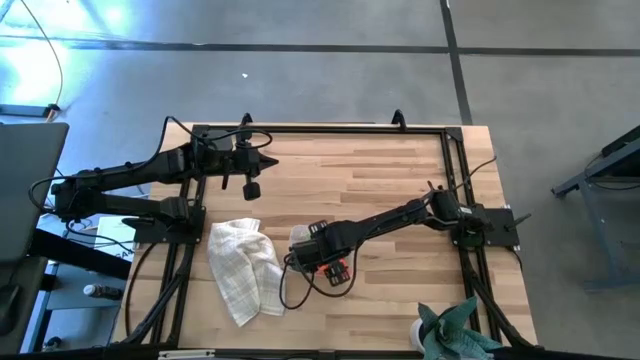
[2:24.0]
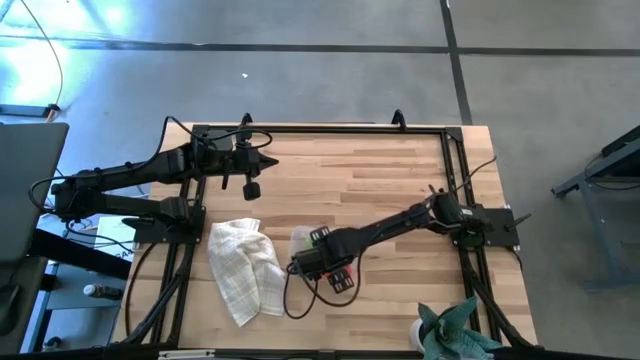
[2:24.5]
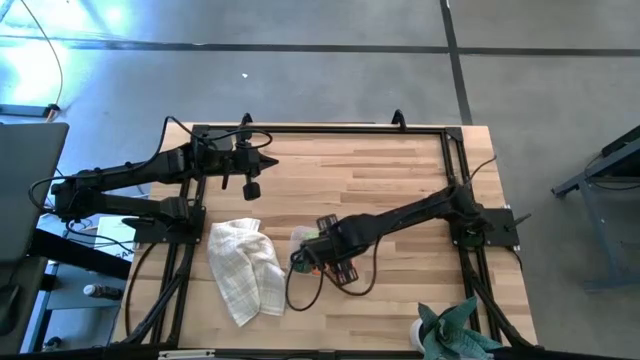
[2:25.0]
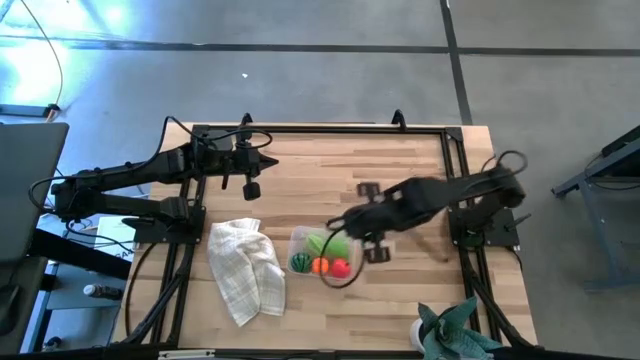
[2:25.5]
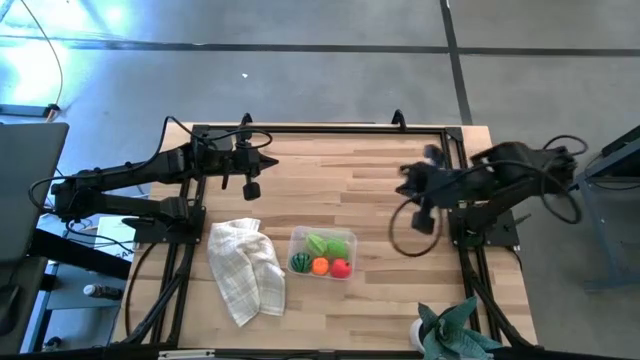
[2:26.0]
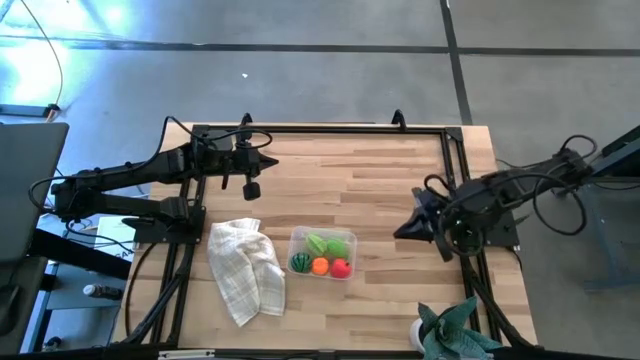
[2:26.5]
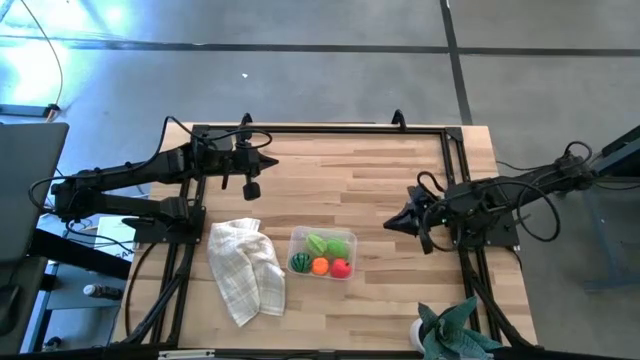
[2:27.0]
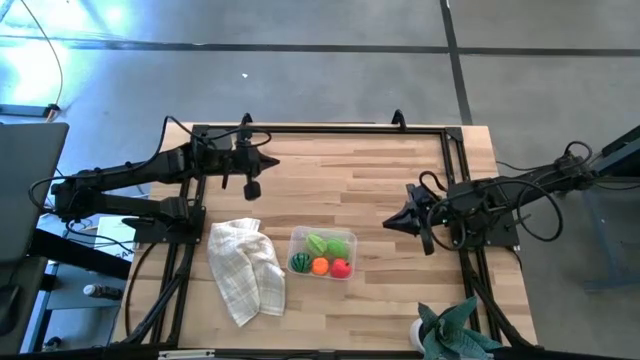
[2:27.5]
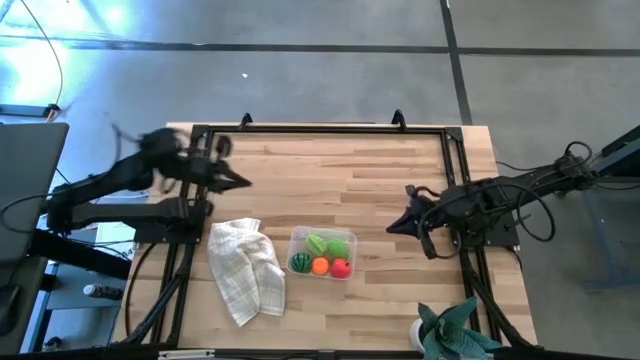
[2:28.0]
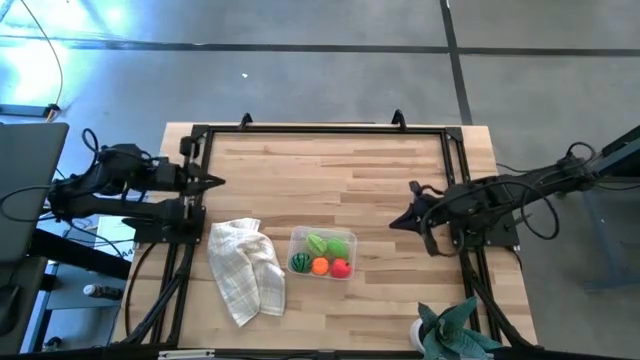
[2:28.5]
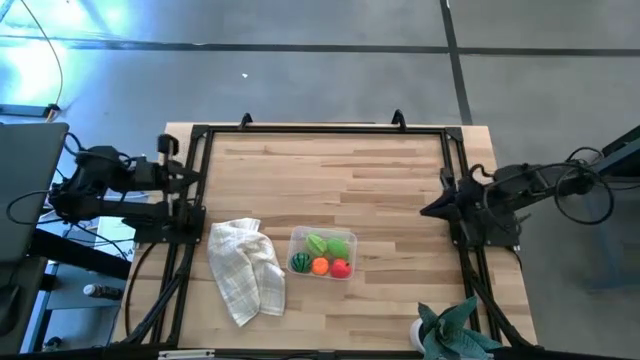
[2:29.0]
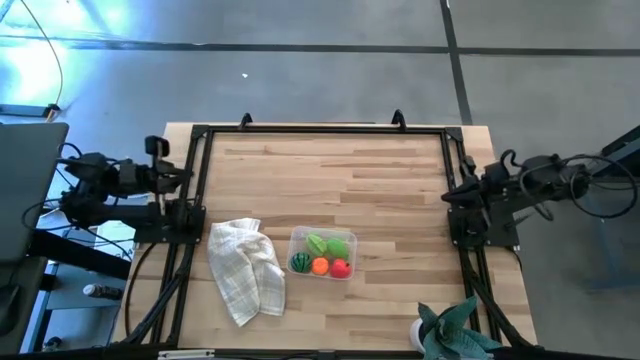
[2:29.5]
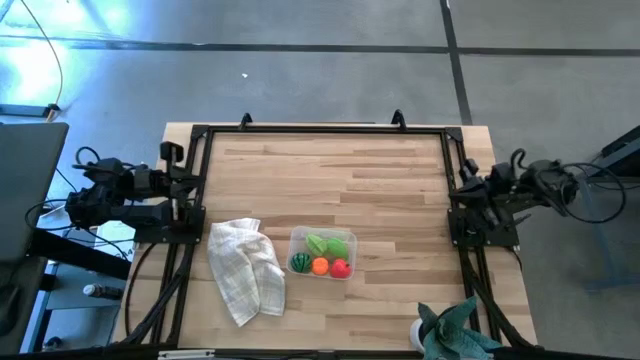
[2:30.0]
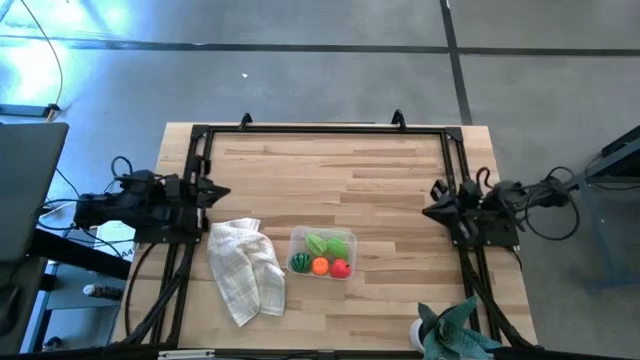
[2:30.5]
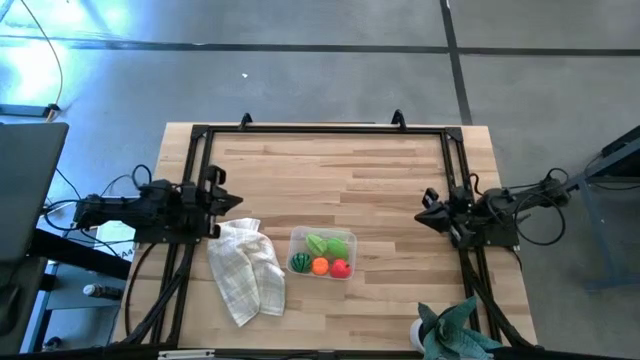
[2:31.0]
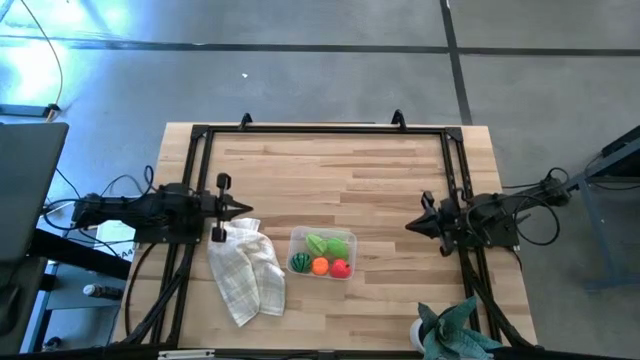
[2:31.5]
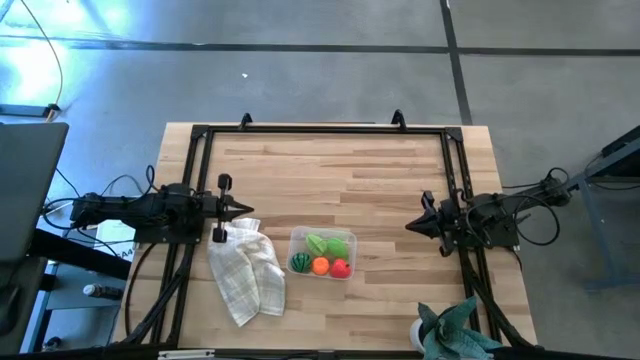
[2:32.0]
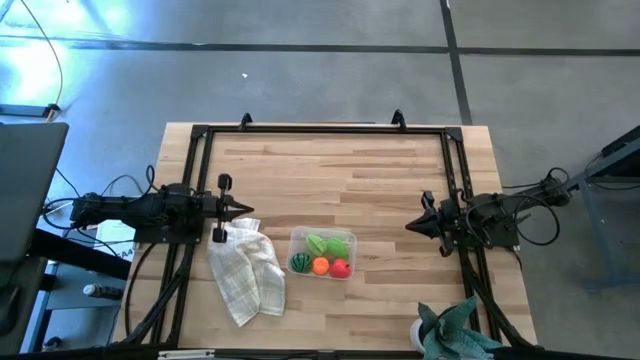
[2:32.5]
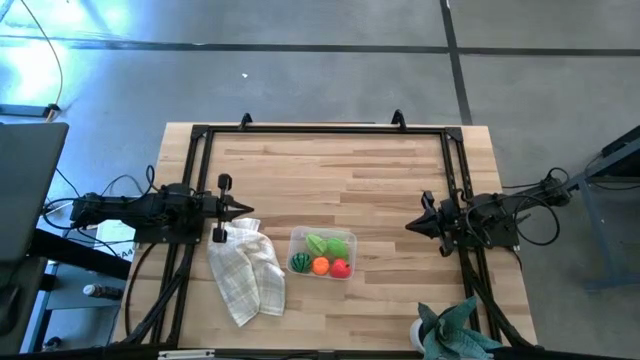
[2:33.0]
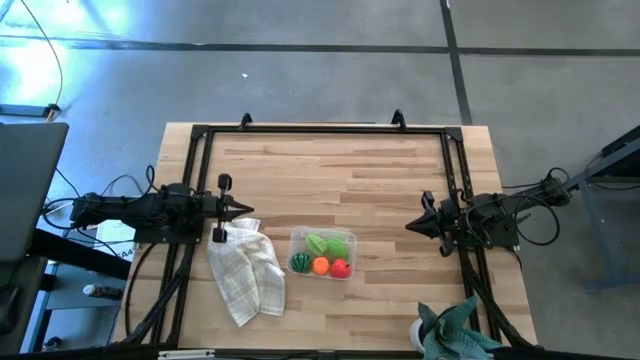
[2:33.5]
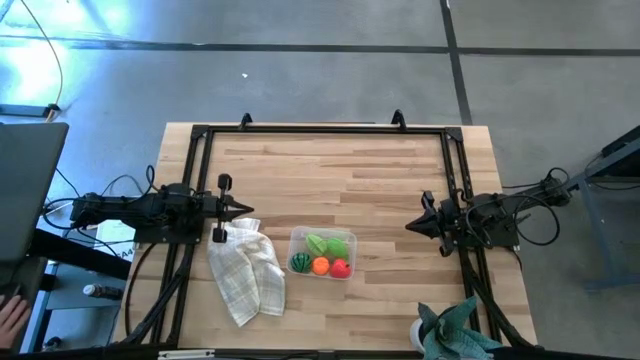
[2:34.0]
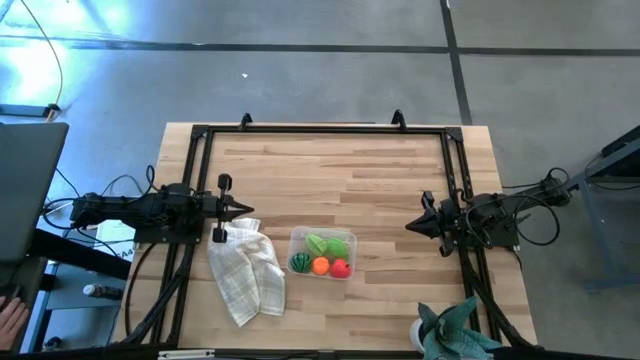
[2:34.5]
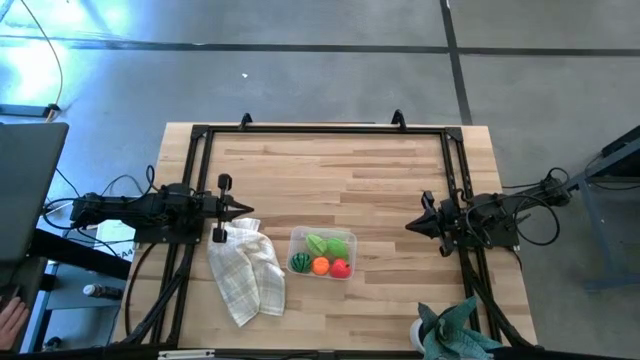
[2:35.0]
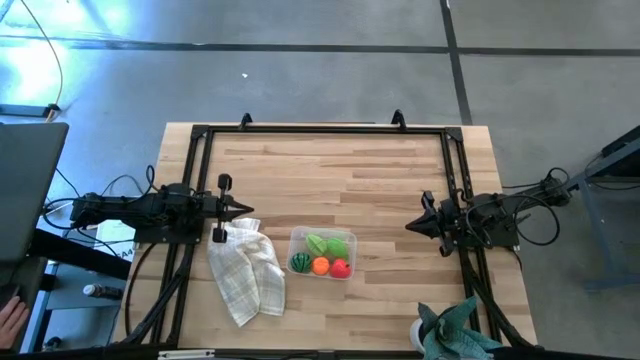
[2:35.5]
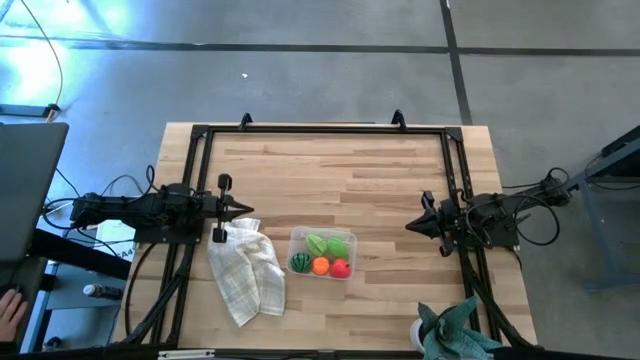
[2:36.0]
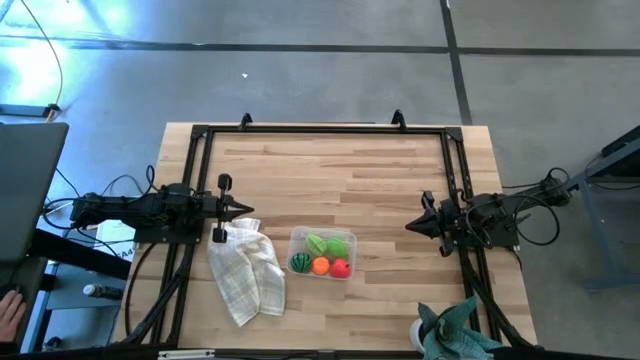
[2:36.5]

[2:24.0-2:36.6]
Task: Pick and placing Produce into tupperware
Return to Home Position

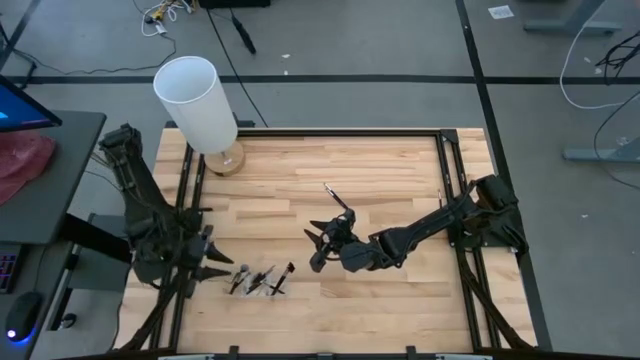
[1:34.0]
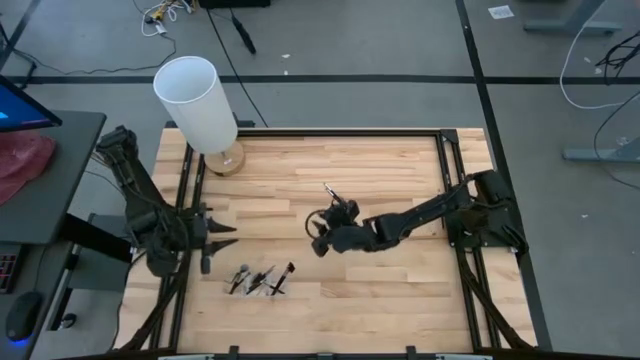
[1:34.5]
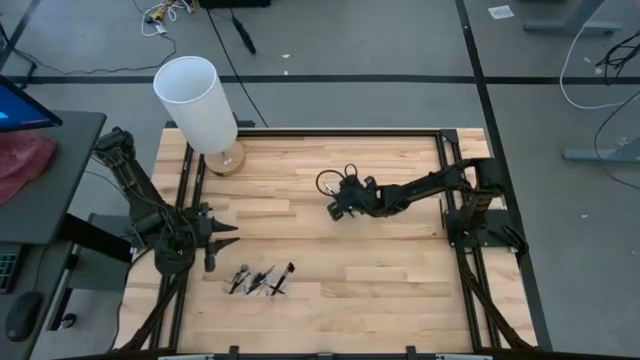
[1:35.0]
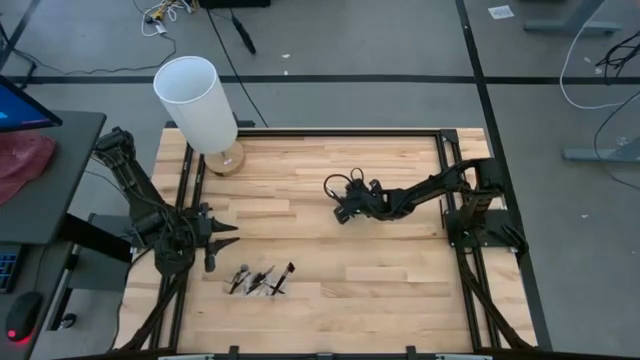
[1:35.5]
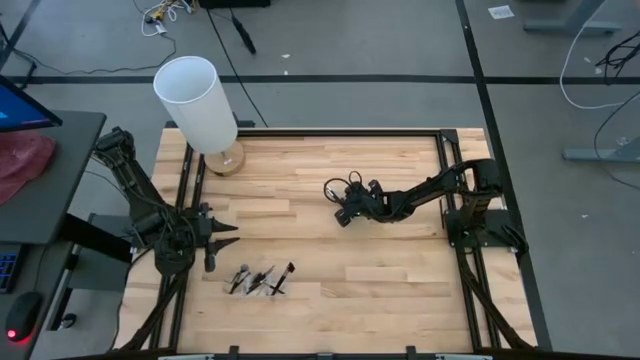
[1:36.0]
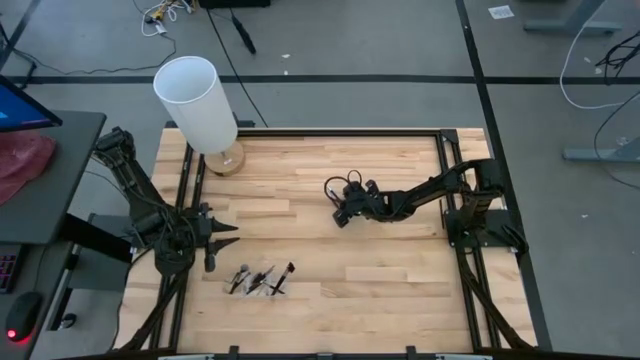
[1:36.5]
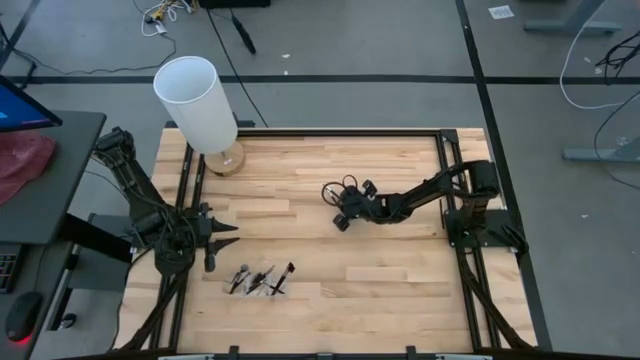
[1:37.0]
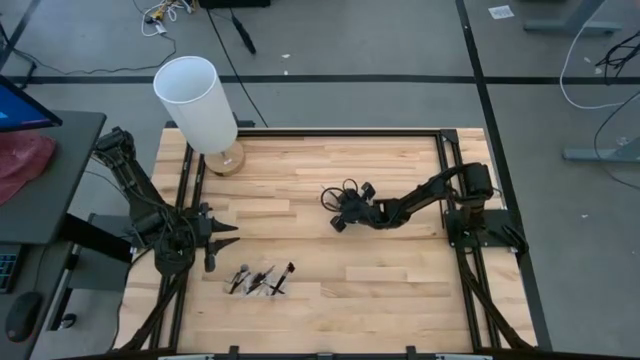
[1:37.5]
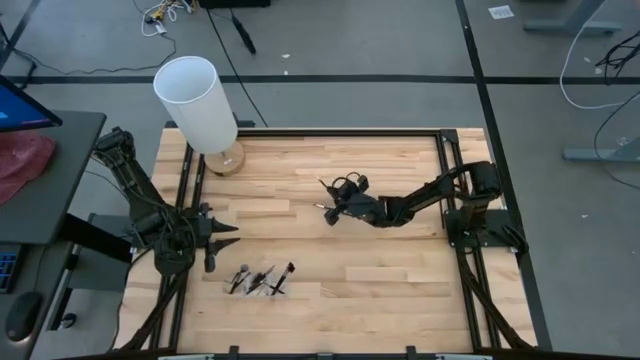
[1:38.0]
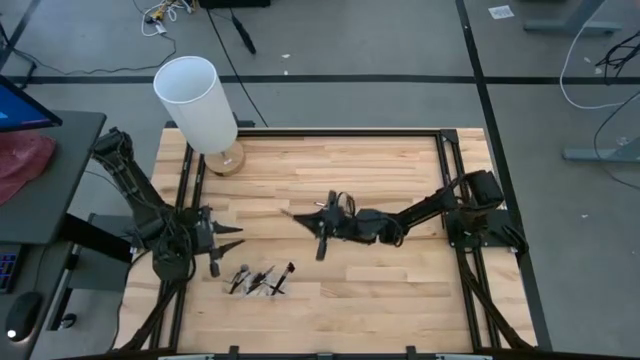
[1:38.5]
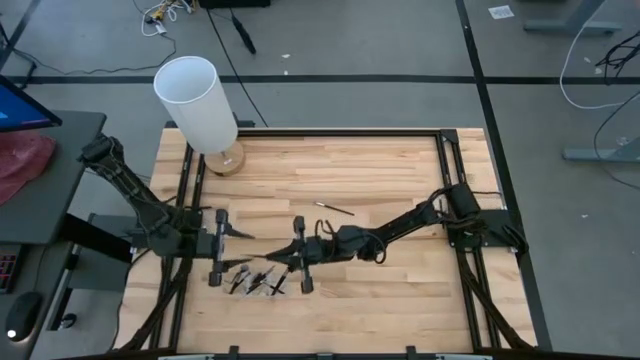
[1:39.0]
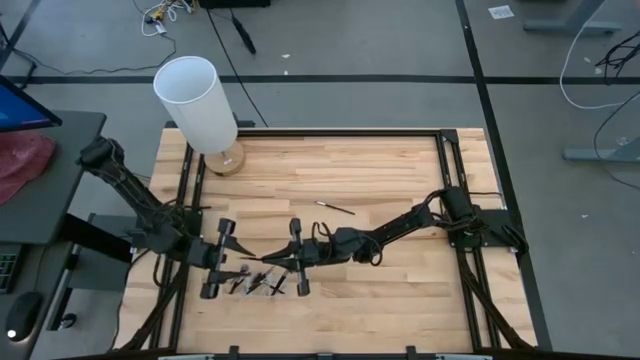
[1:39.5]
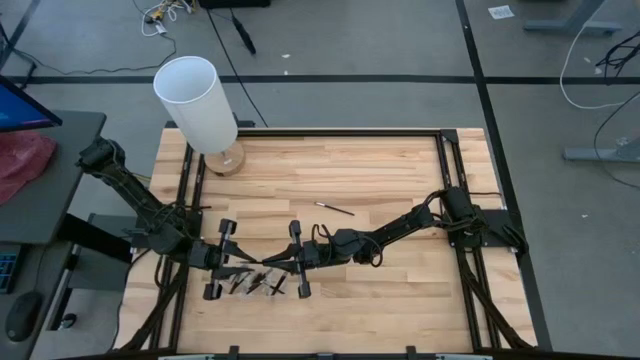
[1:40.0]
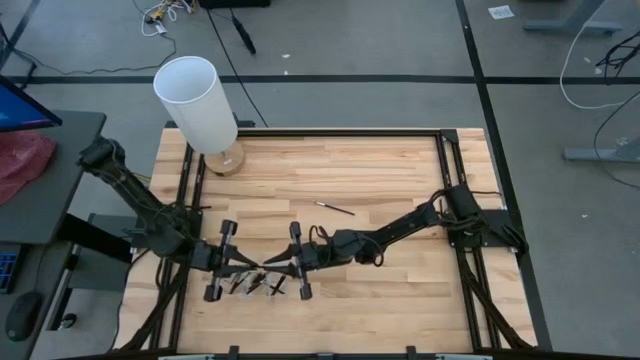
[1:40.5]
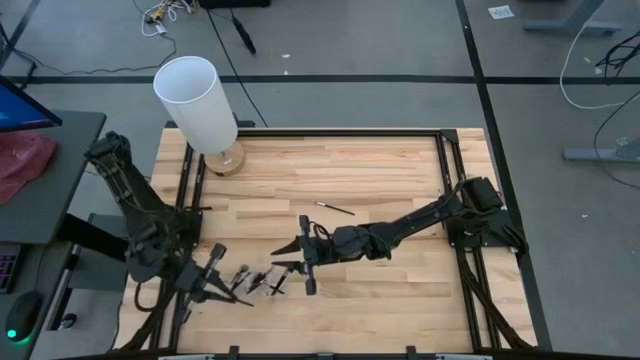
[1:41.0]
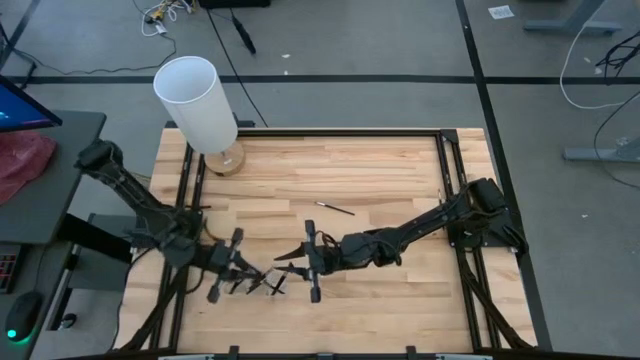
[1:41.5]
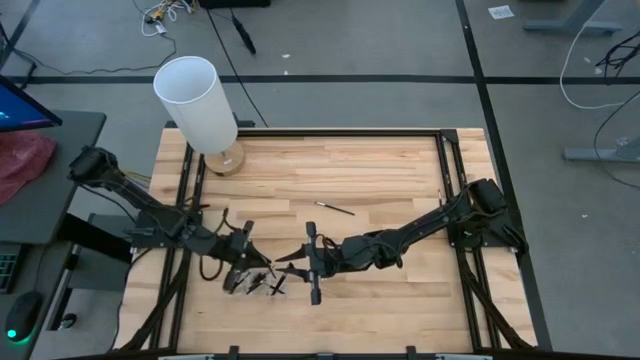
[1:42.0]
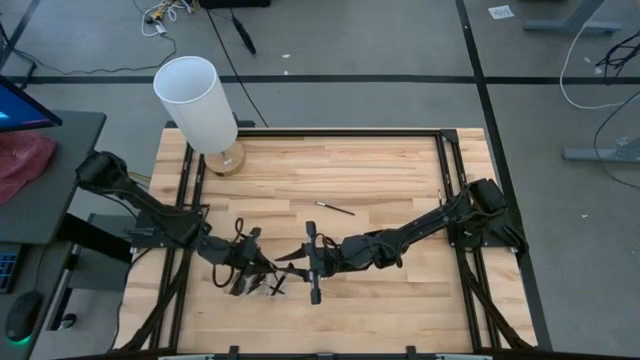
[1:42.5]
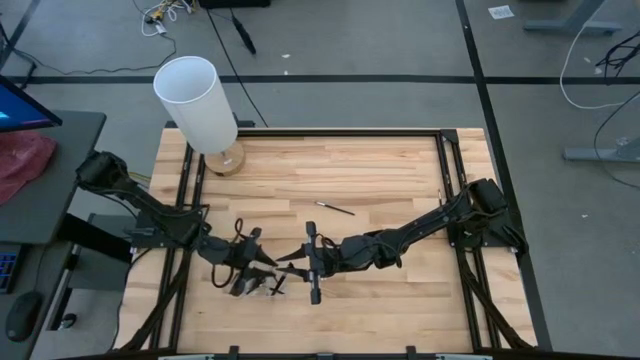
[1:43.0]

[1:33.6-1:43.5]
Task: Put items in baskets/containers
Put the eyeshadow brush into the transparent organizer
